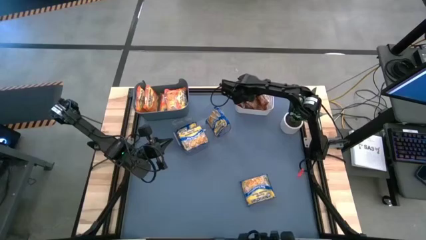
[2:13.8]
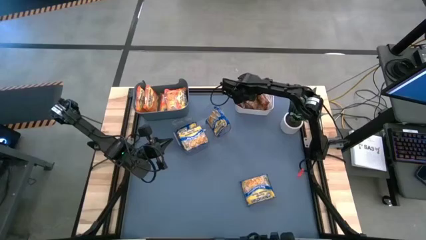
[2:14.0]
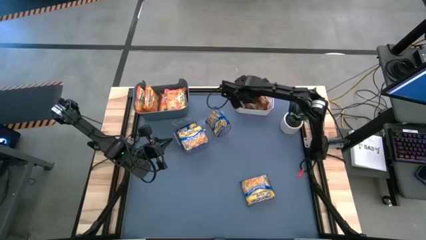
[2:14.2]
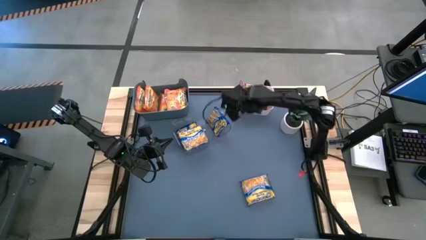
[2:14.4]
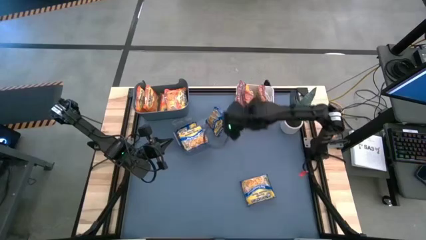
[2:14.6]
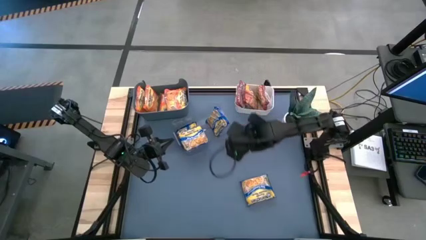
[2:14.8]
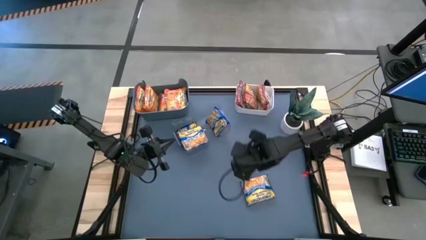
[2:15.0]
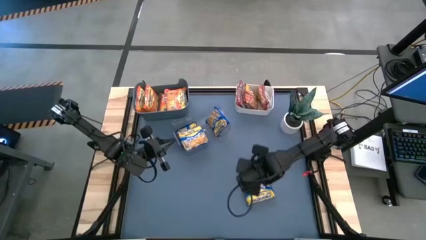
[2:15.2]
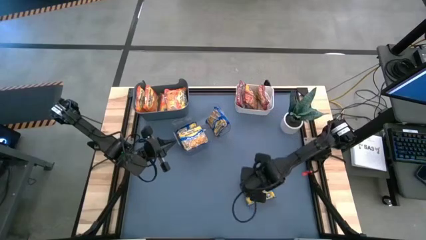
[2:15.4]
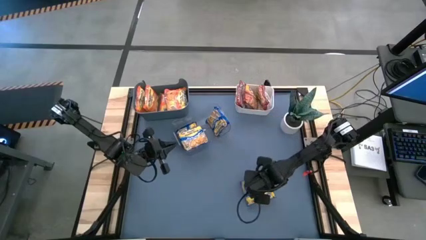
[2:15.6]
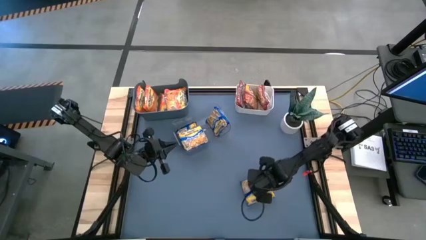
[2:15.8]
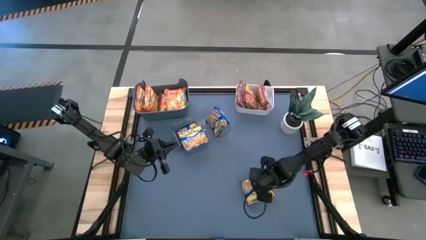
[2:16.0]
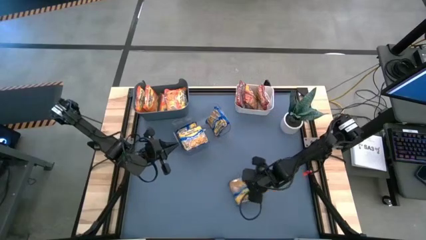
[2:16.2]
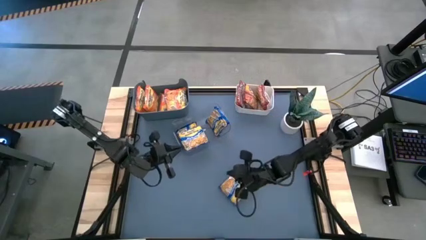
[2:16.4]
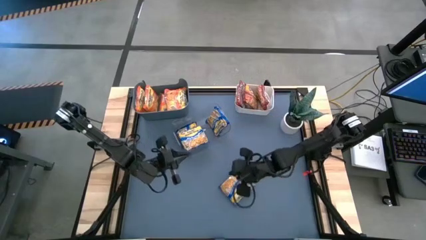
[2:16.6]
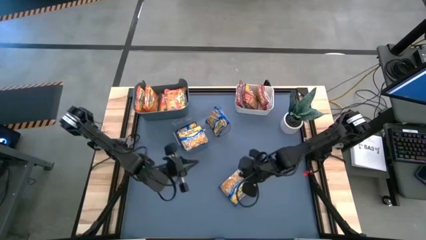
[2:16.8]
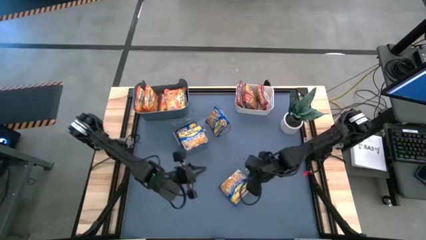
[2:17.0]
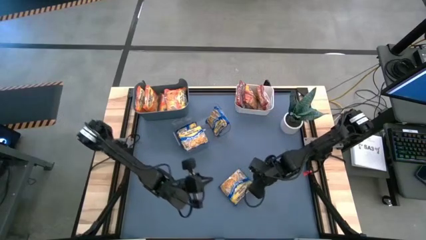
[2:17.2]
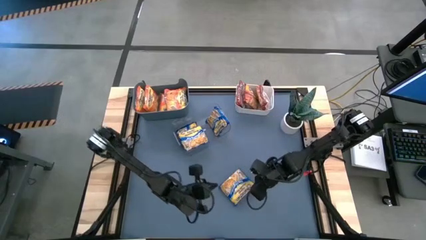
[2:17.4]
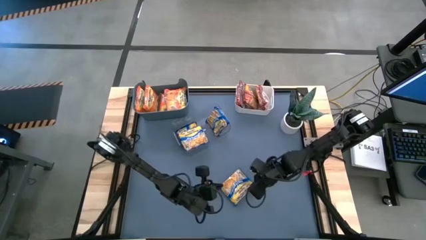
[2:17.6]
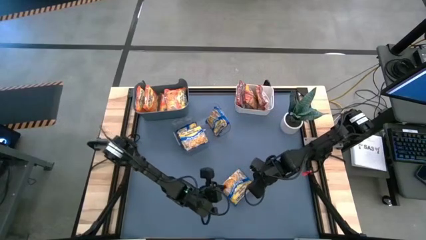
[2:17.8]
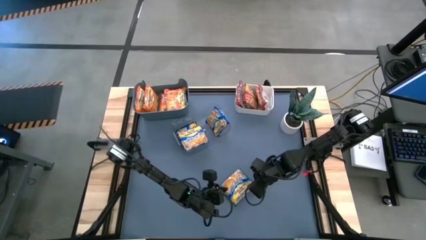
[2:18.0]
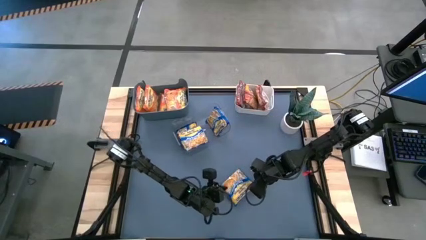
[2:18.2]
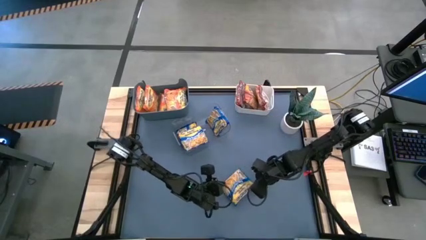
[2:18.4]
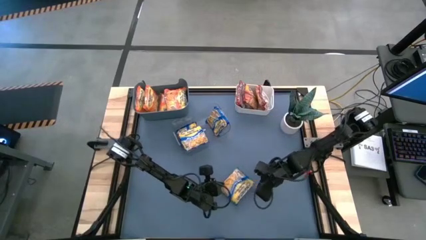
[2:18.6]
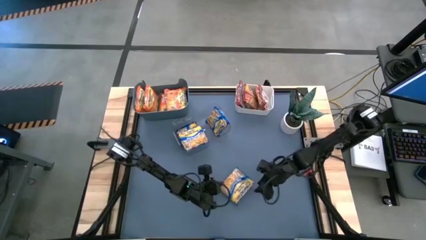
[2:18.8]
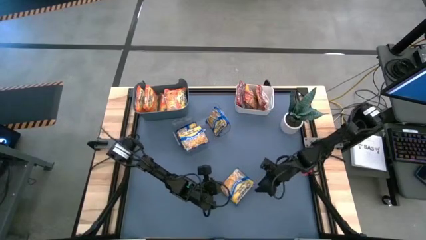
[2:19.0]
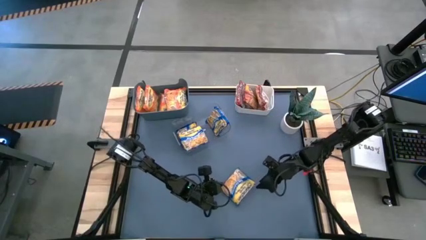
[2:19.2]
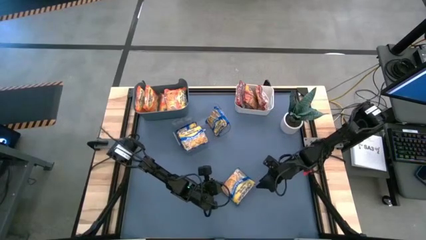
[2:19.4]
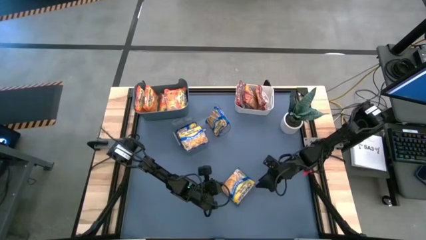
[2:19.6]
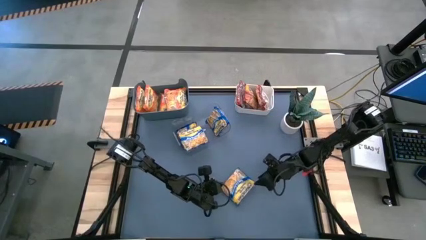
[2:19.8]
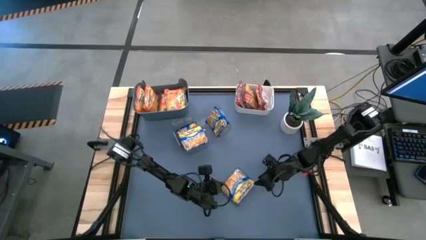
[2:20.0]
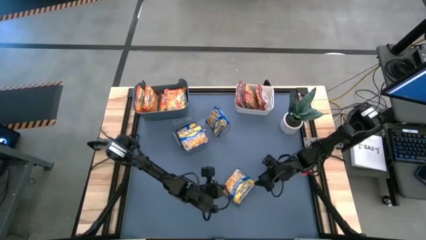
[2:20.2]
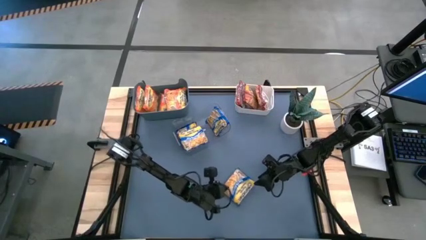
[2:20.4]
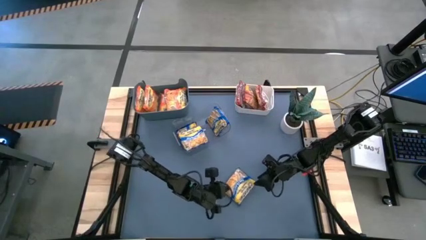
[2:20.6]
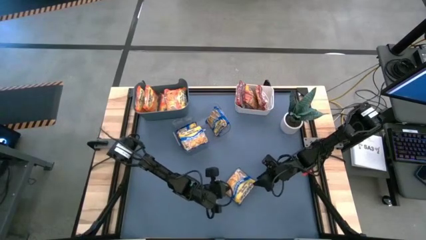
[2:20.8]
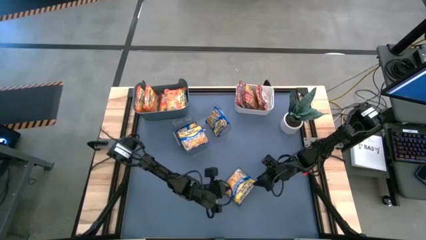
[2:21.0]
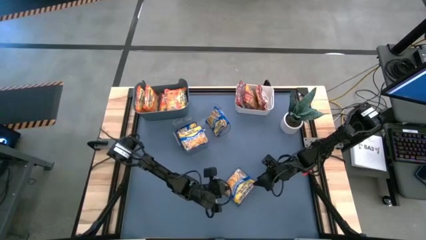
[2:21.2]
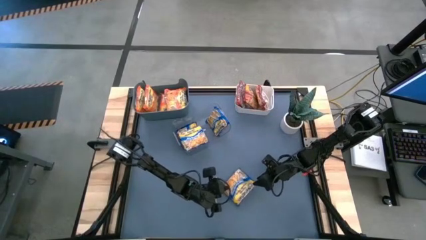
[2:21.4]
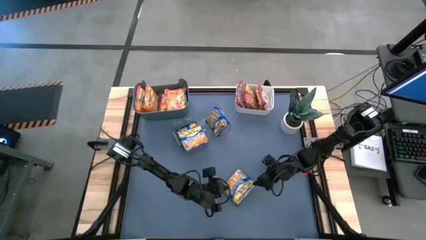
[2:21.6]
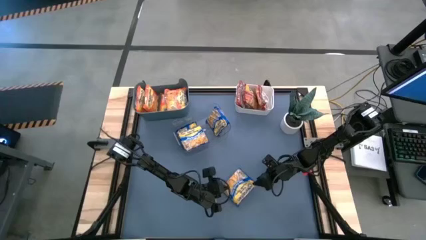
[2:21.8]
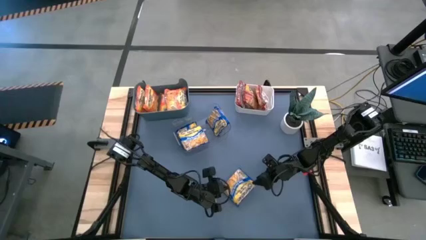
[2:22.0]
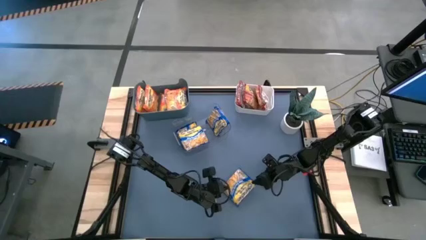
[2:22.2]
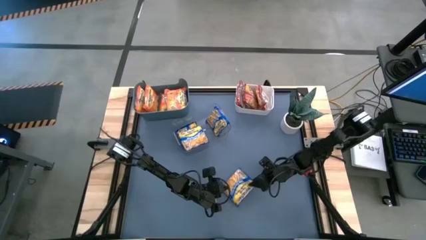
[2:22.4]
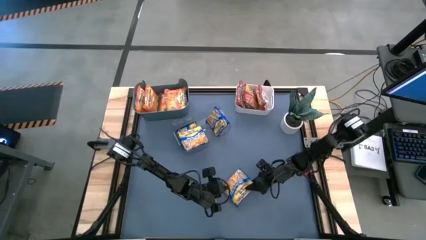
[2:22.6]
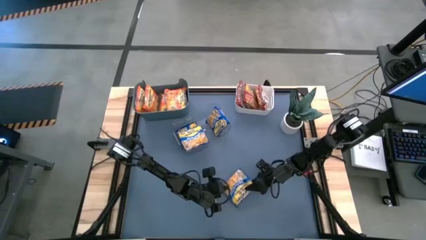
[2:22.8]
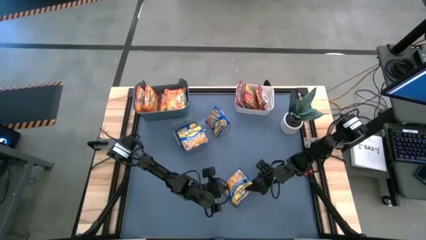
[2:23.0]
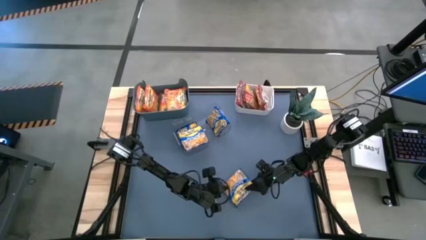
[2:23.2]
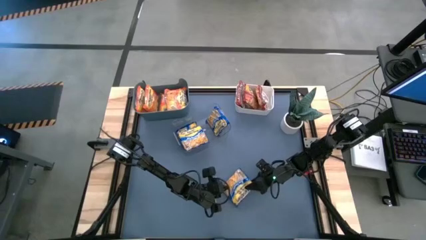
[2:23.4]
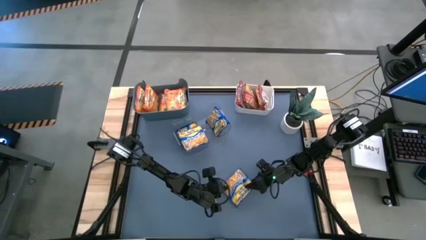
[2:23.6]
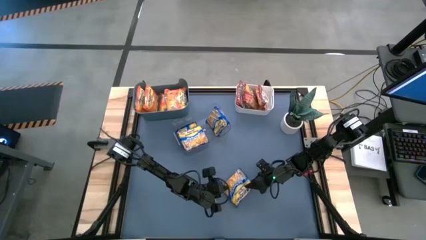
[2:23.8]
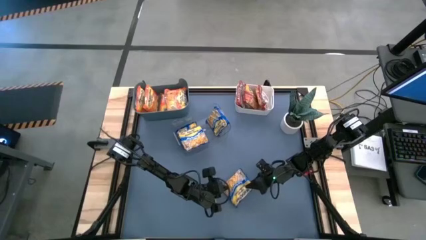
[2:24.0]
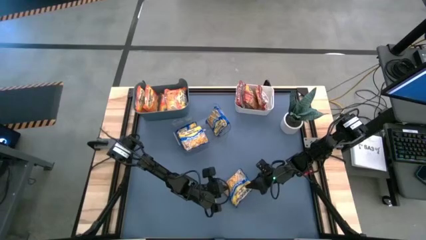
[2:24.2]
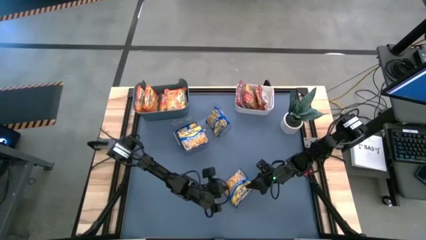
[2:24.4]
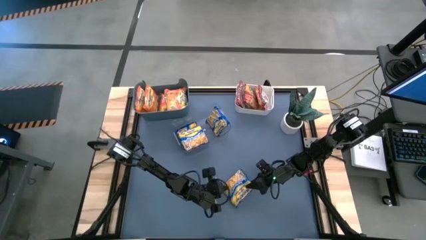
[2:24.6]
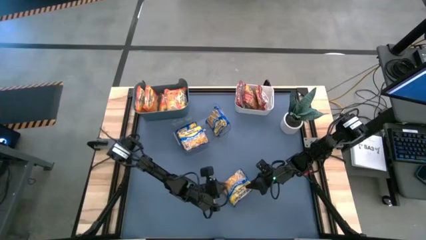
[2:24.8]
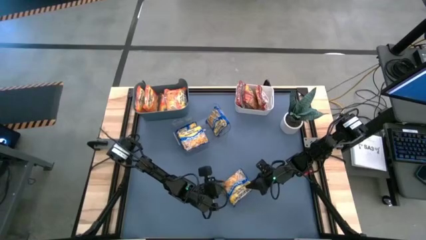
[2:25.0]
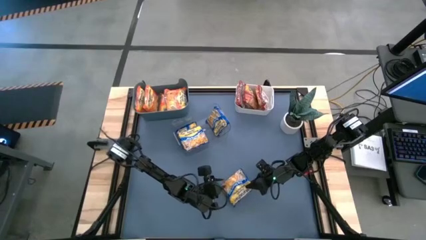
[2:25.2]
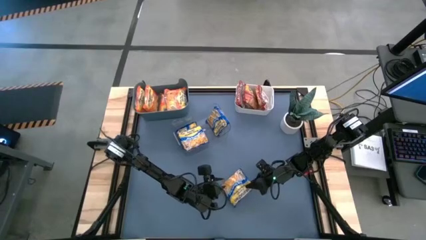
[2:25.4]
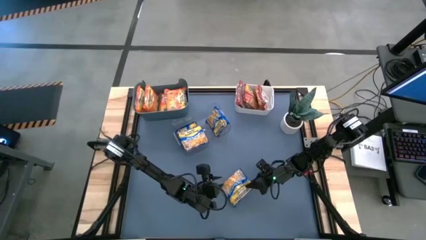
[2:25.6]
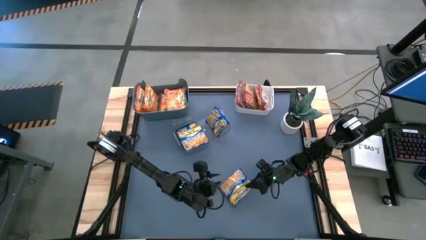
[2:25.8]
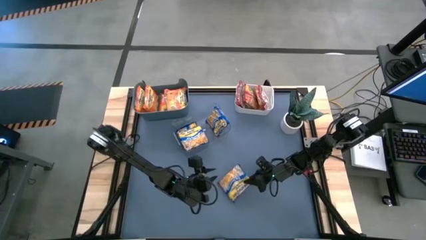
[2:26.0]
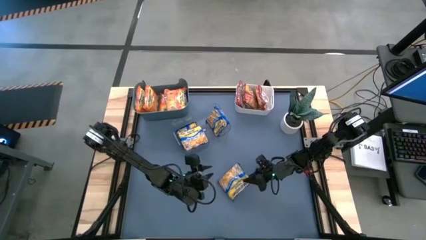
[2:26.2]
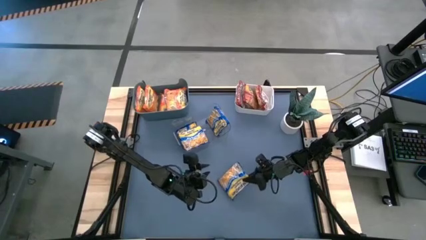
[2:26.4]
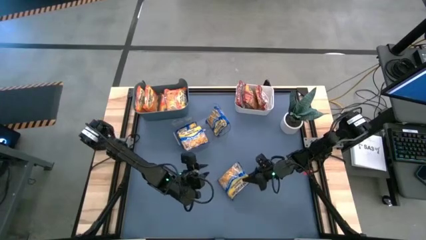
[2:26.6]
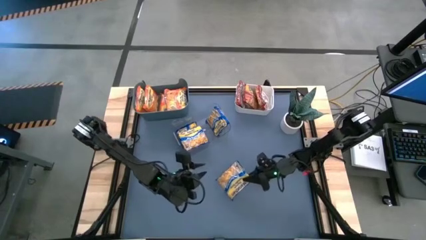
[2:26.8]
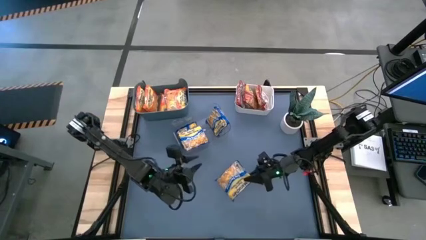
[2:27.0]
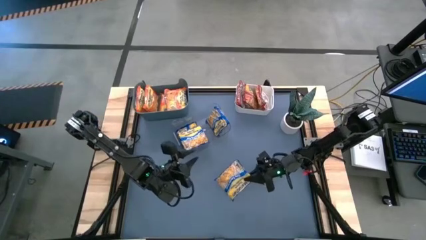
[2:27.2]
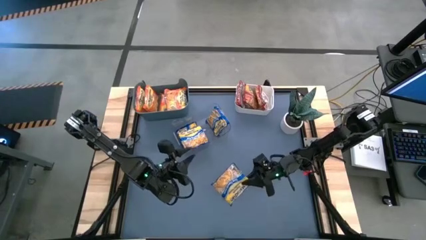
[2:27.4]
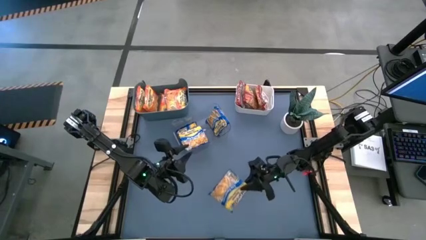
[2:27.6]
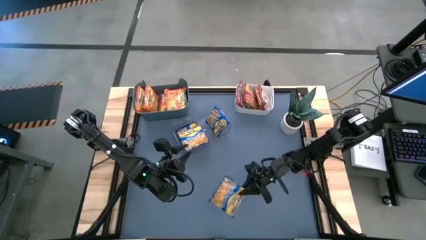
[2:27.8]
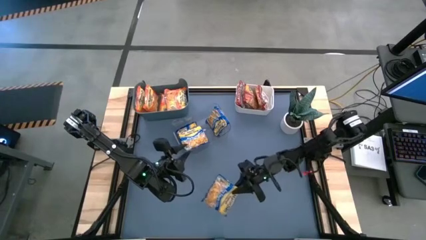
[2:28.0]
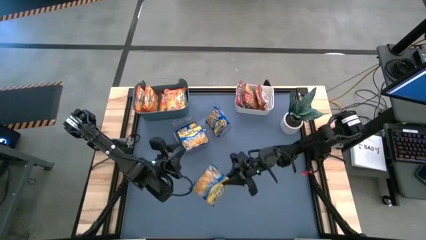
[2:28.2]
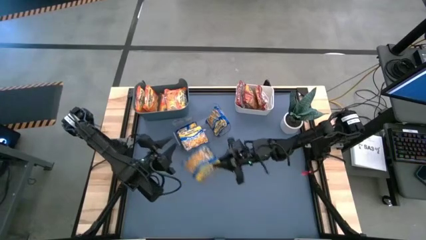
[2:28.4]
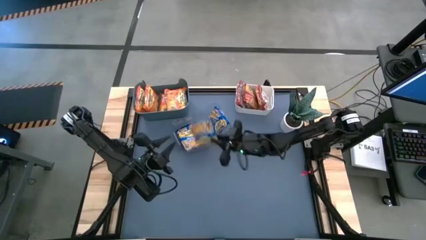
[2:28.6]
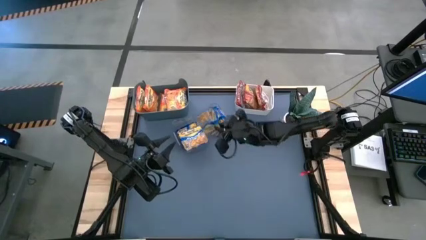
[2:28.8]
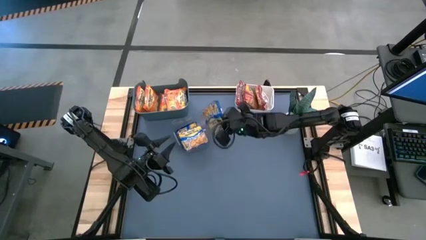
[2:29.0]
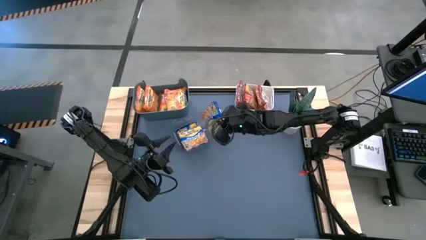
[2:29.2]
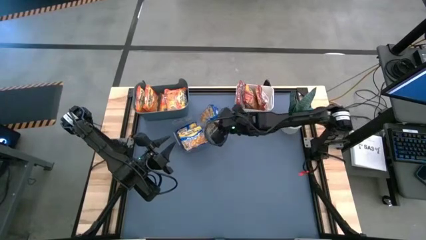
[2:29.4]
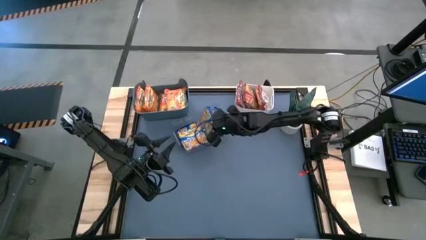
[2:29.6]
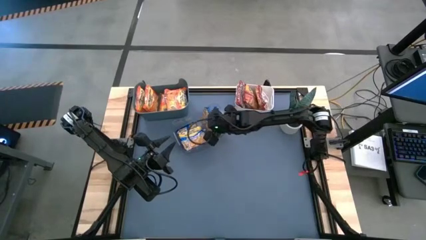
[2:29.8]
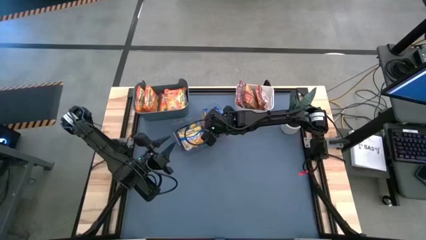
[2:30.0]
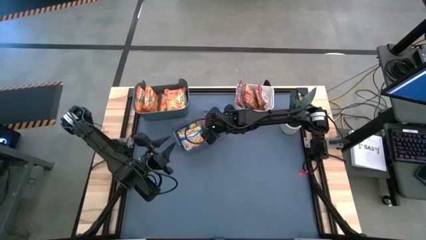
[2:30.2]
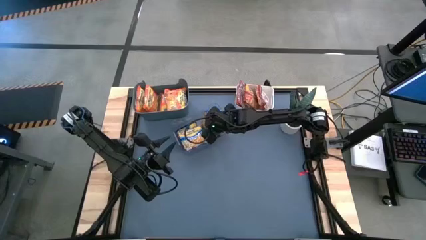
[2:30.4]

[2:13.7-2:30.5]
Task: Sort Maruchan noodles
Put the blue noodle pack into the white bin
